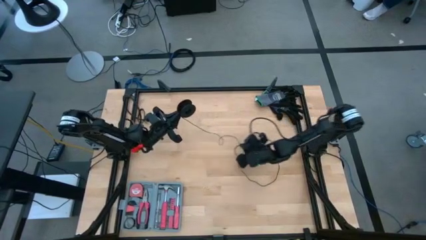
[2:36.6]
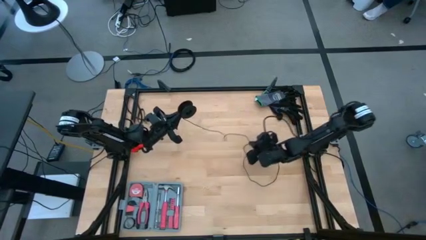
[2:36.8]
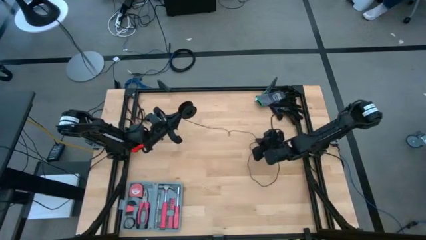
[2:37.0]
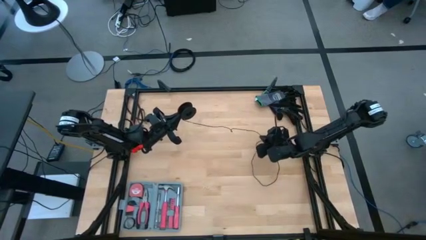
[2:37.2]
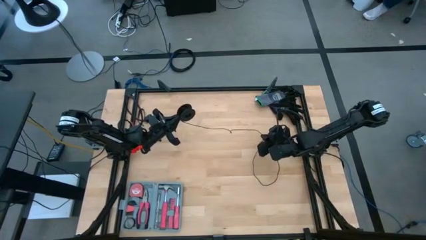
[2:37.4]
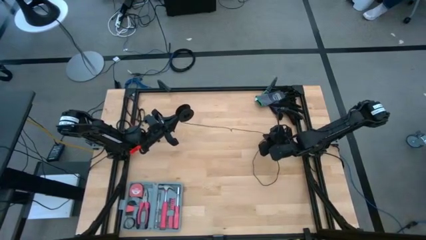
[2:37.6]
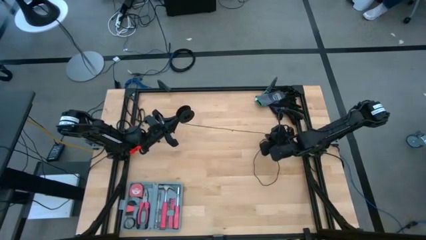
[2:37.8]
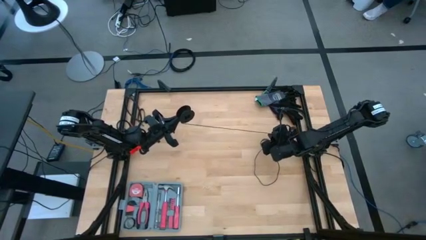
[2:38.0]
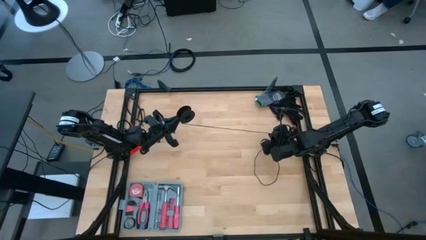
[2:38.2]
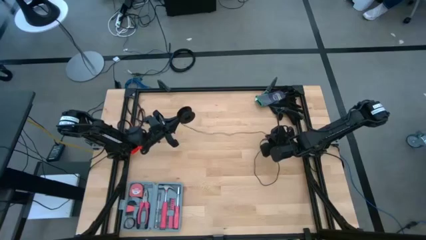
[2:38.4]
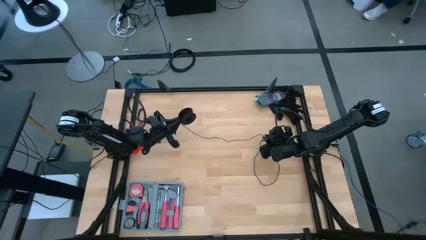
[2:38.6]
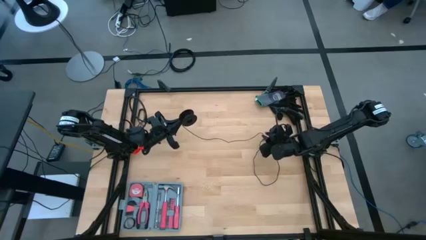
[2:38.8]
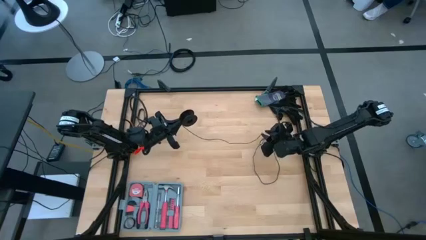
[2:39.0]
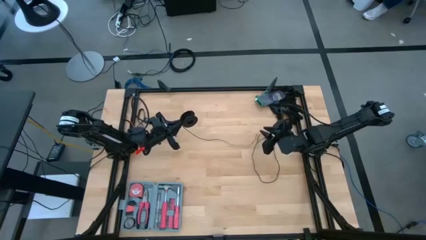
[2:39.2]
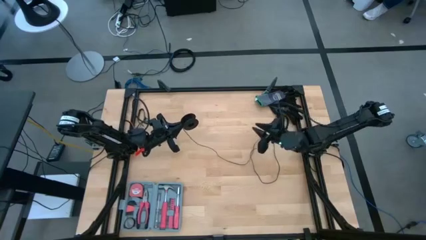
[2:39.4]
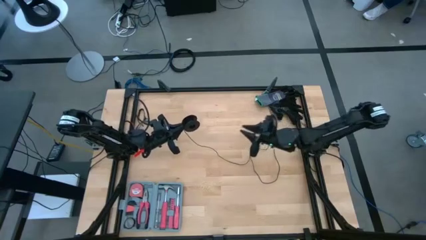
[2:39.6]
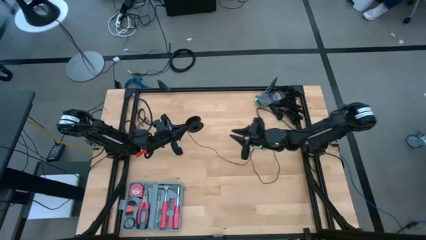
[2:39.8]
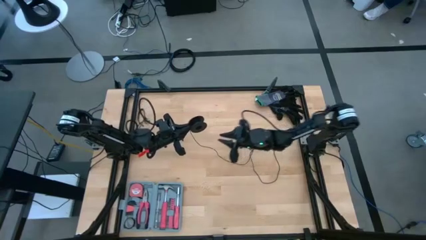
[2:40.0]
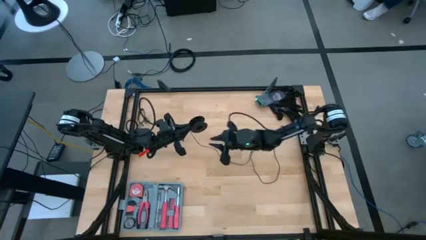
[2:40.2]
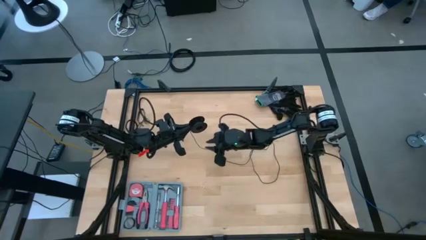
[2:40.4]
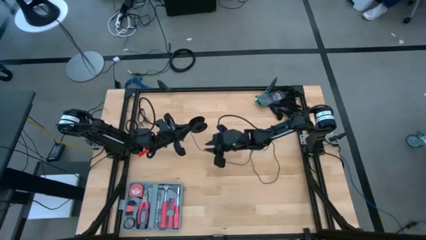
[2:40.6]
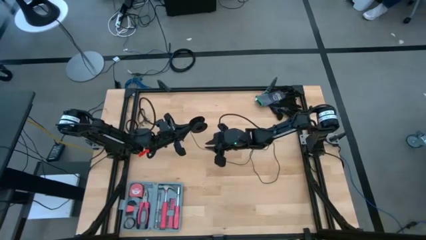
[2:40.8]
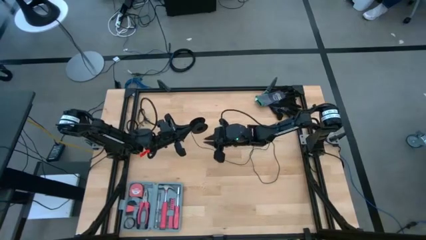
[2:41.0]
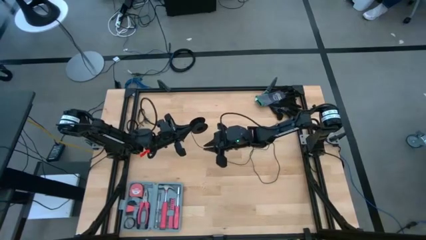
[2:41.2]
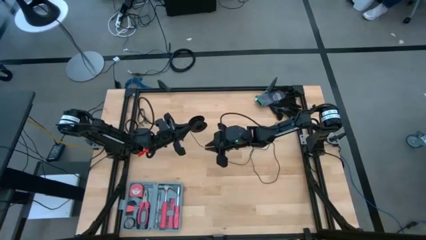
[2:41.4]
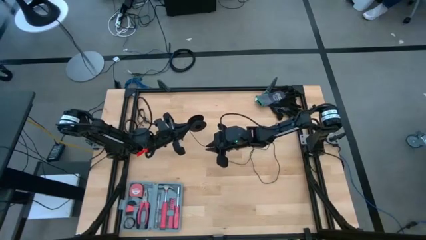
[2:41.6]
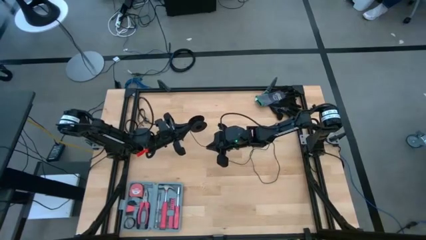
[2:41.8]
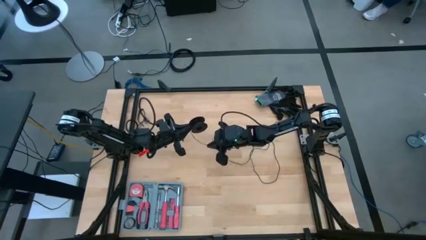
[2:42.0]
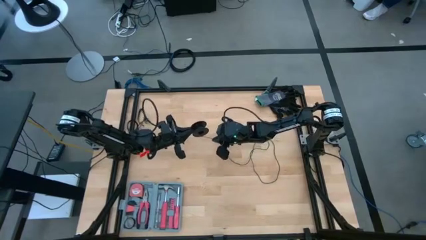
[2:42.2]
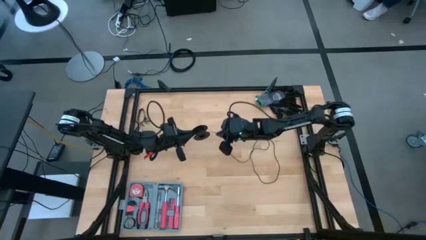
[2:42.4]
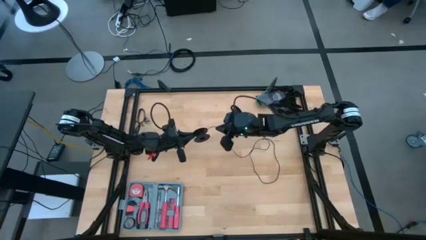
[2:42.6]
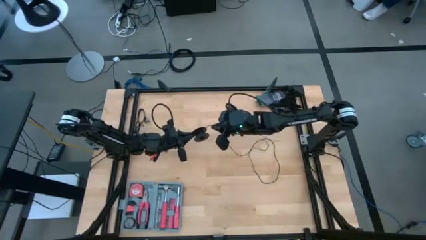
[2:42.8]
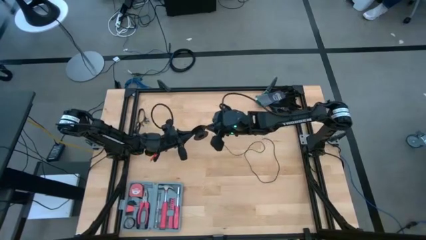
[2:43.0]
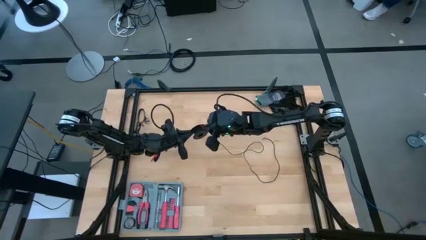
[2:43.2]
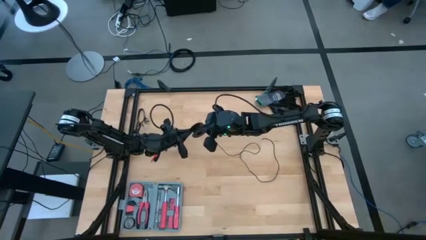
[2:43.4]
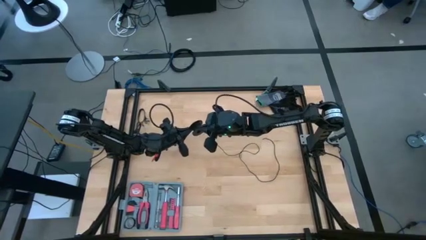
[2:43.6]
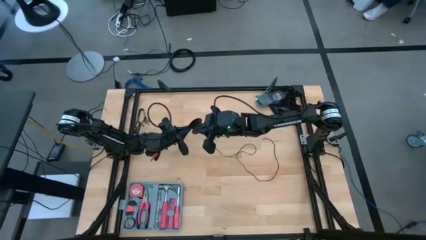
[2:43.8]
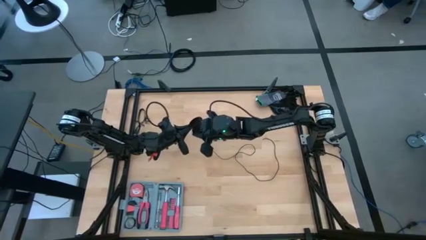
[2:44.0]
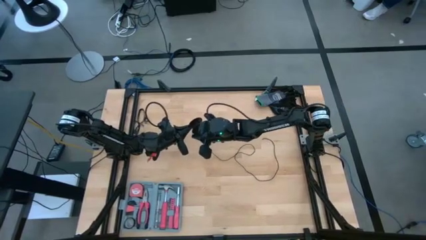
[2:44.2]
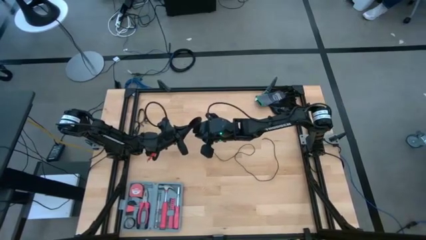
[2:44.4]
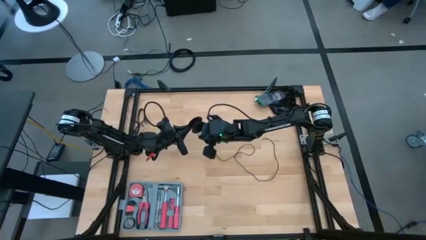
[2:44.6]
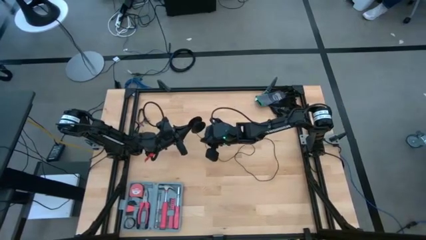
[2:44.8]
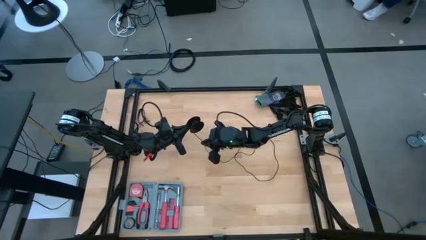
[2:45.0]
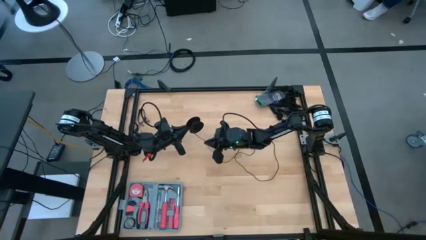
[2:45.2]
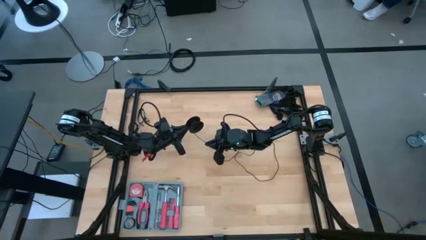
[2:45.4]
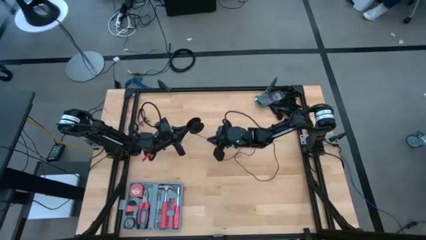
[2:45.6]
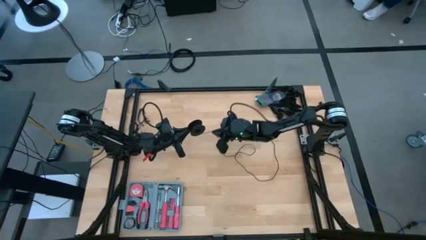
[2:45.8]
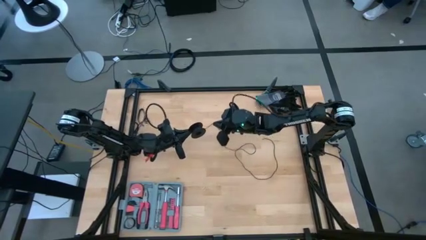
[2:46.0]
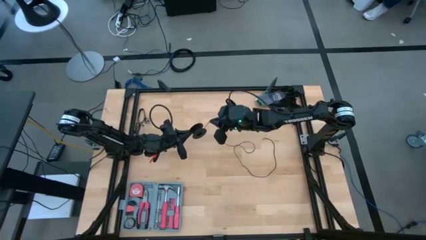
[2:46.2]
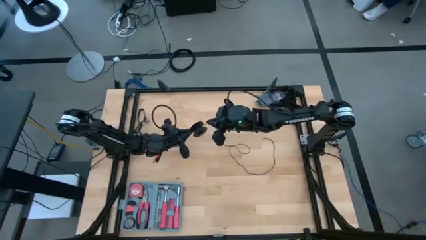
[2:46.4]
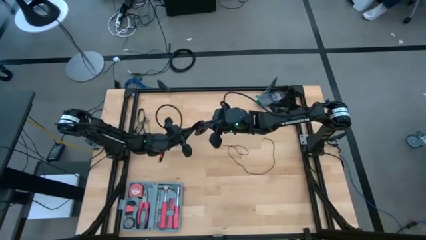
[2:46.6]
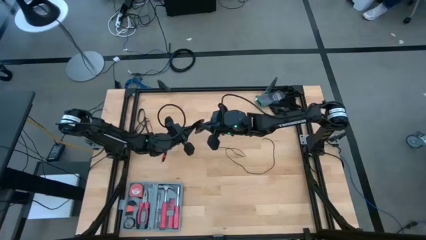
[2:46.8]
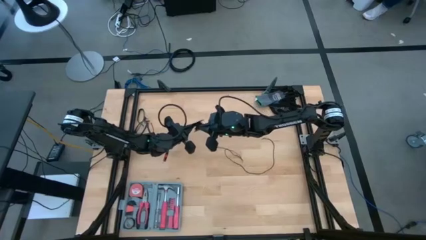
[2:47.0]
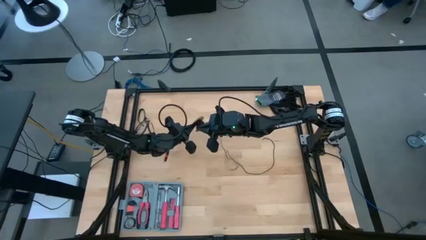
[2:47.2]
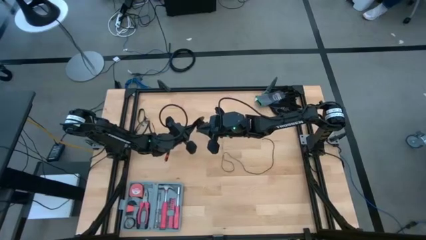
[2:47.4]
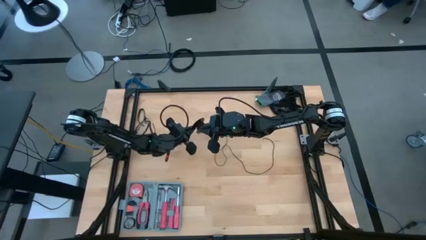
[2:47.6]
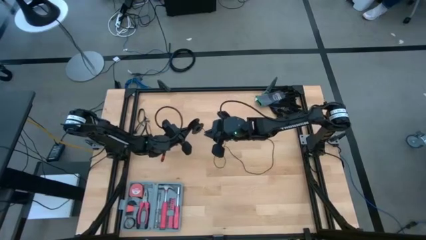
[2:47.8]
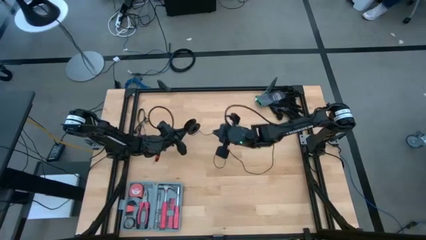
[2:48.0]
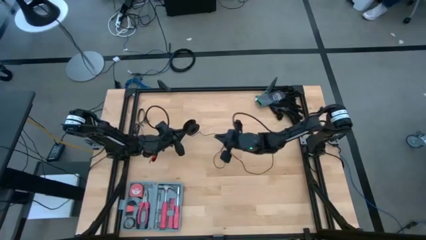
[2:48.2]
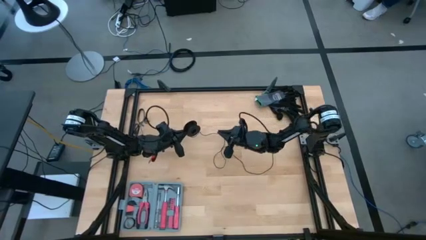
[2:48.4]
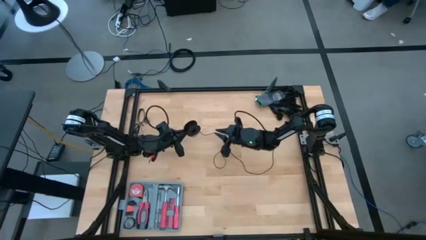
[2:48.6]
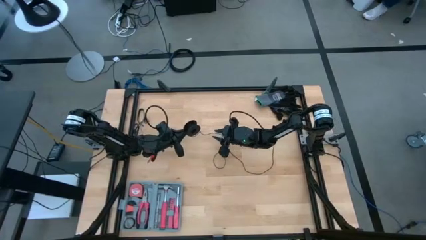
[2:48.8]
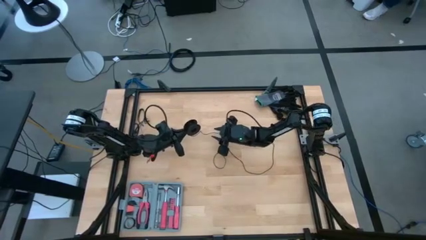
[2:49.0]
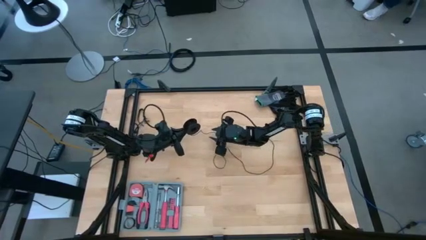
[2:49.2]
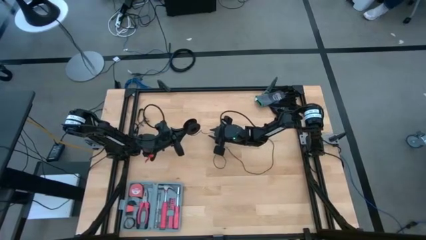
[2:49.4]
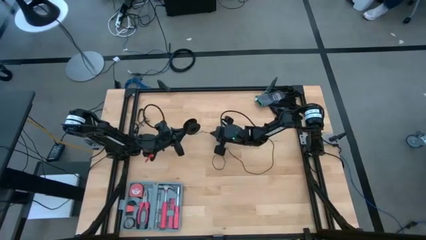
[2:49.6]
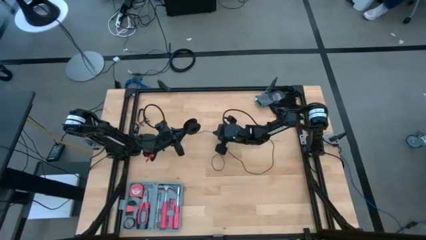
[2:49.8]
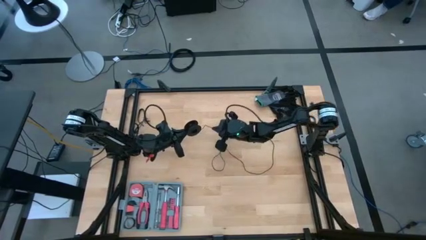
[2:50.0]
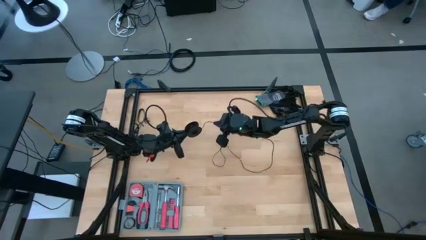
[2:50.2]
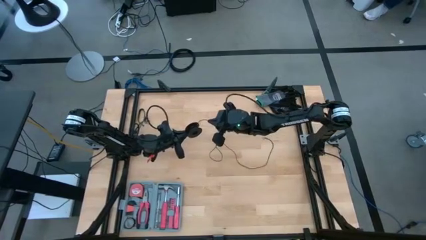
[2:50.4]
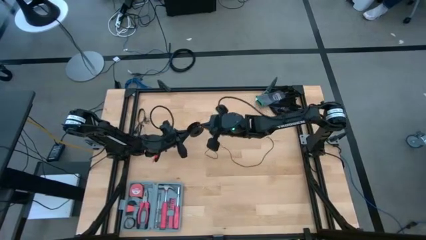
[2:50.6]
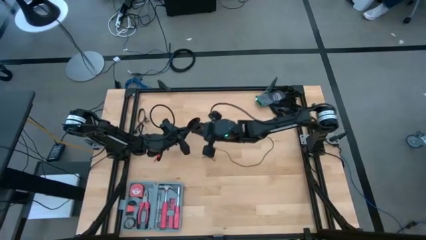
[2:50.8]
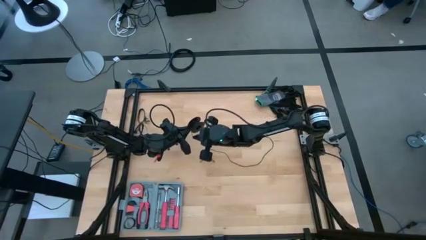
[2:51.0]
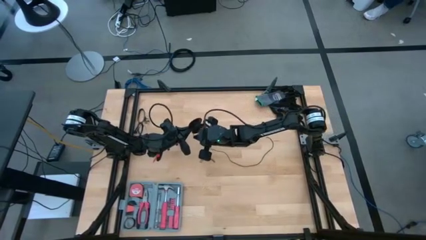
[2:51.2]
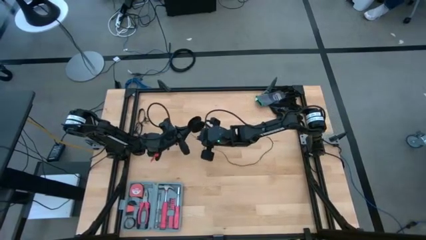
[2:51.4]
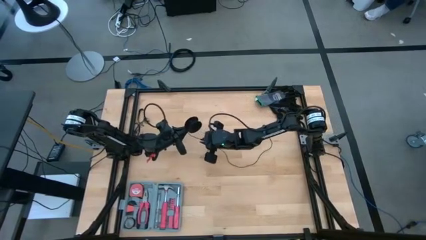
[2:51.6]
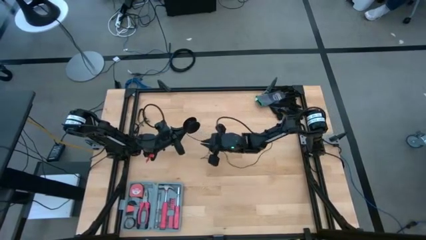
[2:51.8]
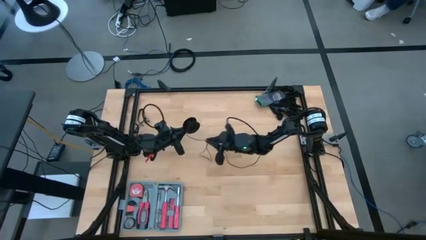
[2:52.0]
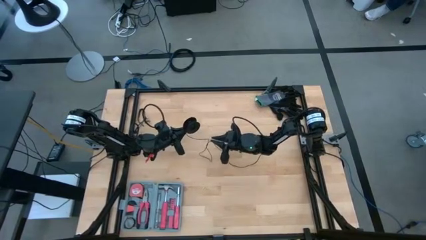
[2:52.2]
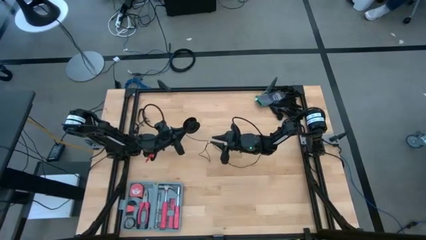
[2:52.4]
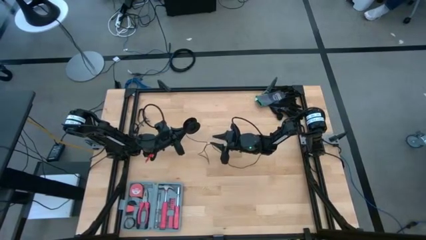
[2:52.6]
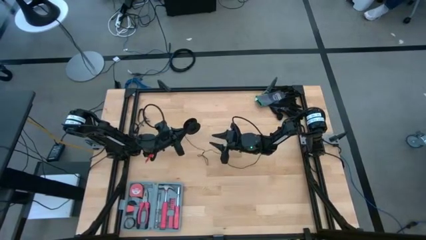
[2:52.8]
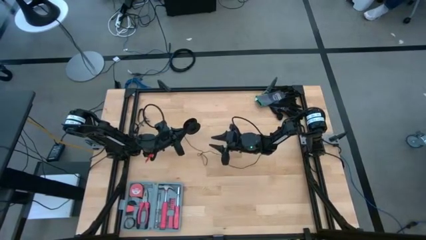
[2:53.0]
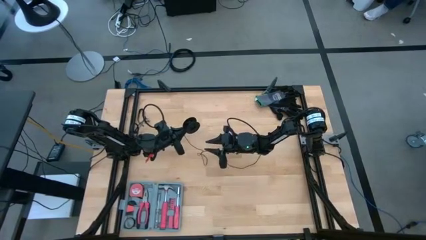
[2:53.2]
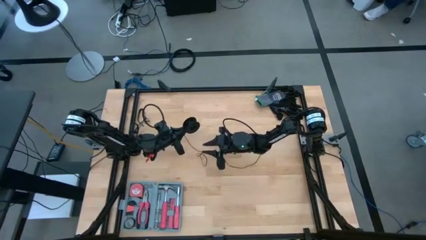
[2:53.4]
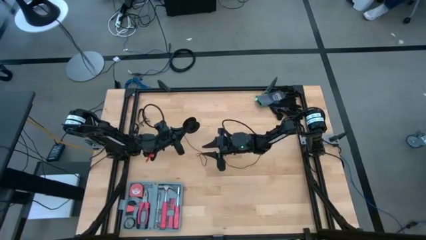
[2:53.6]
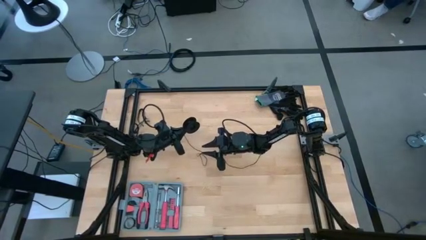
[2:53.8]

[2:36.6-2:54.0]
Task: Coil cords
Coil the black wire on the spool
